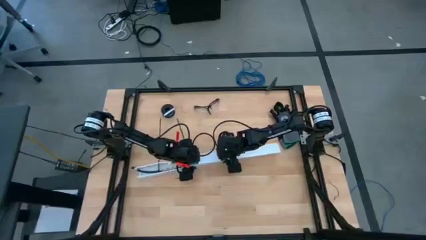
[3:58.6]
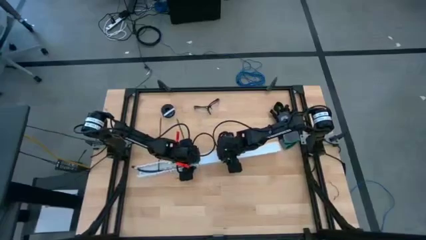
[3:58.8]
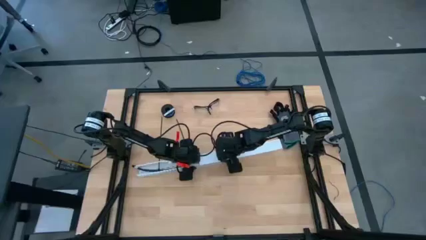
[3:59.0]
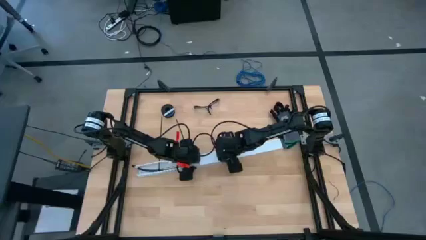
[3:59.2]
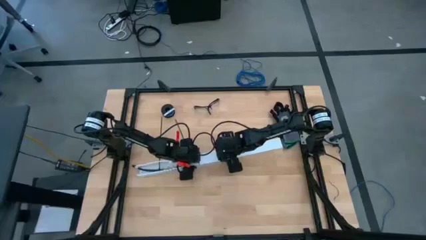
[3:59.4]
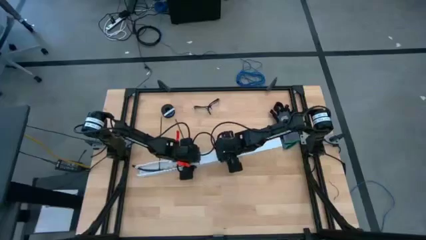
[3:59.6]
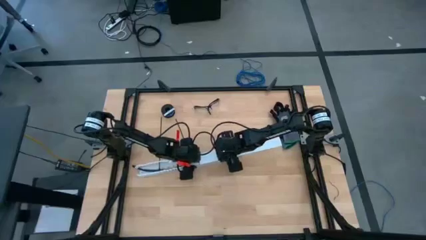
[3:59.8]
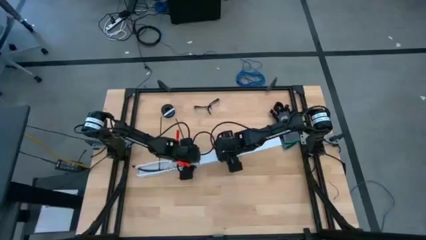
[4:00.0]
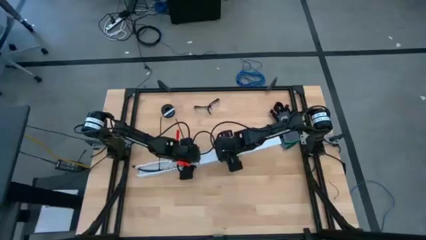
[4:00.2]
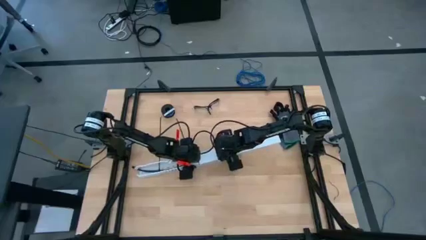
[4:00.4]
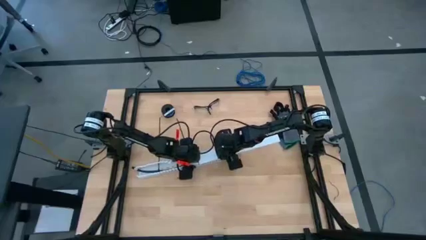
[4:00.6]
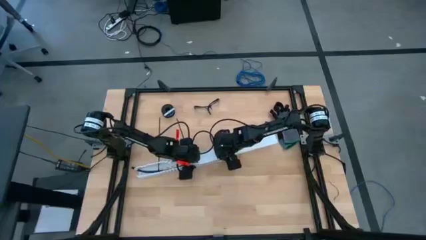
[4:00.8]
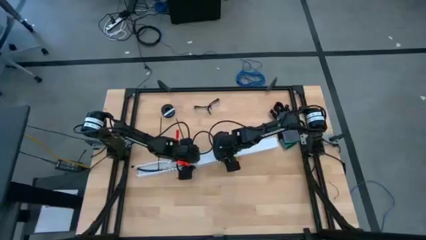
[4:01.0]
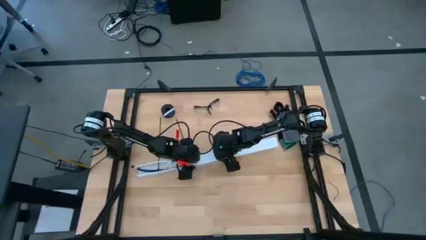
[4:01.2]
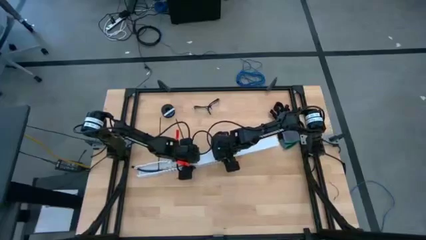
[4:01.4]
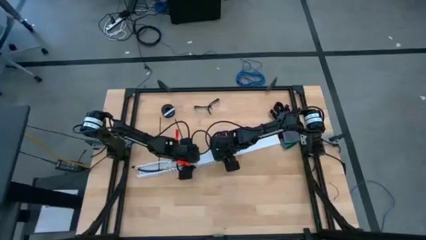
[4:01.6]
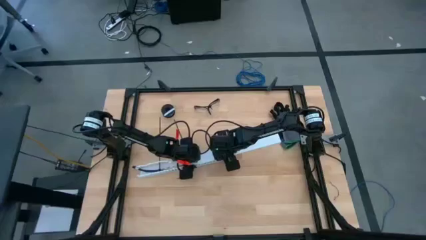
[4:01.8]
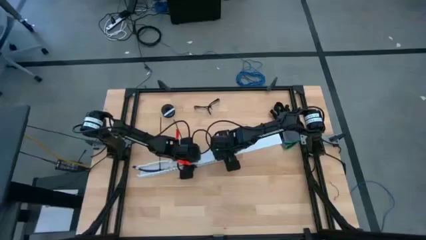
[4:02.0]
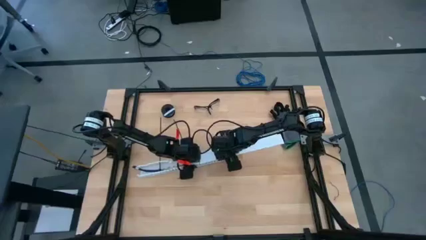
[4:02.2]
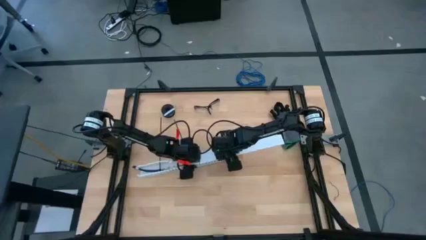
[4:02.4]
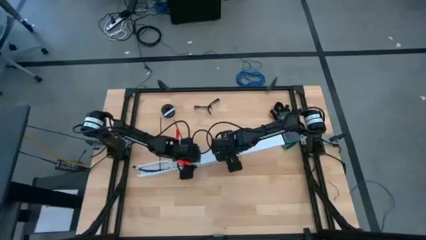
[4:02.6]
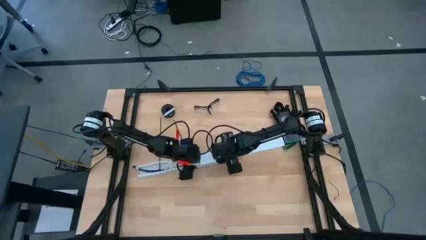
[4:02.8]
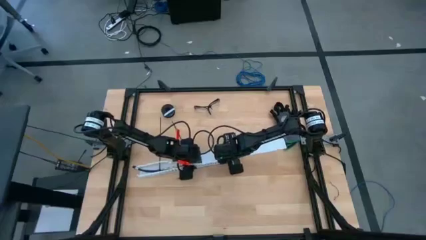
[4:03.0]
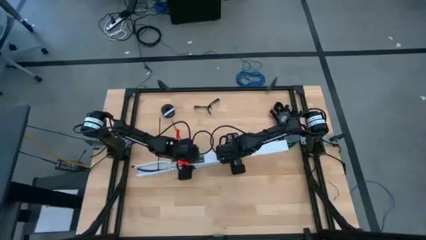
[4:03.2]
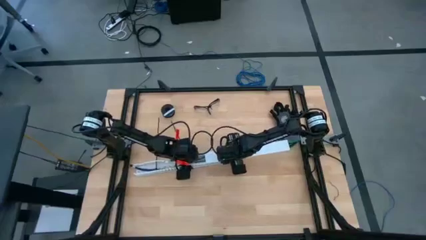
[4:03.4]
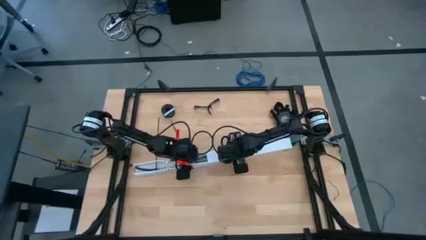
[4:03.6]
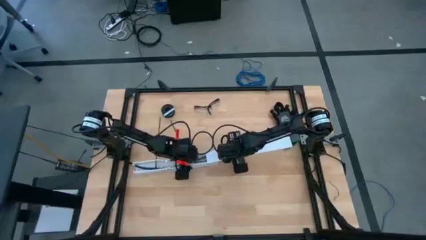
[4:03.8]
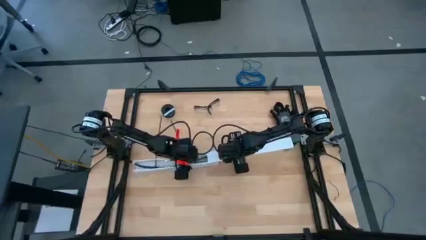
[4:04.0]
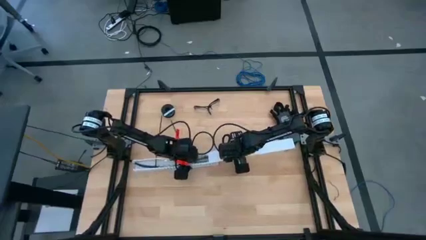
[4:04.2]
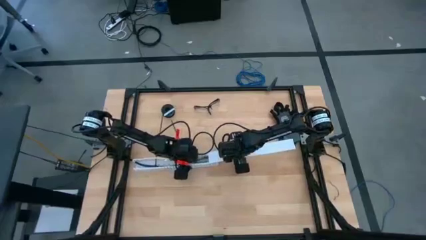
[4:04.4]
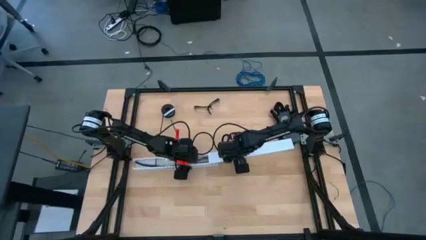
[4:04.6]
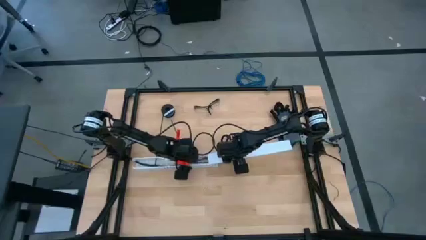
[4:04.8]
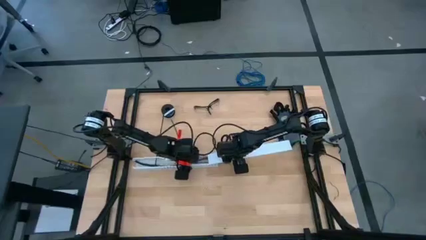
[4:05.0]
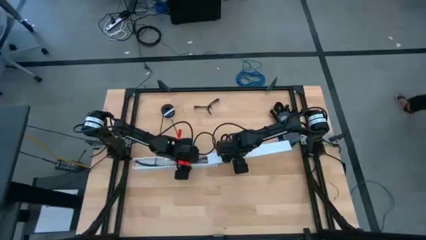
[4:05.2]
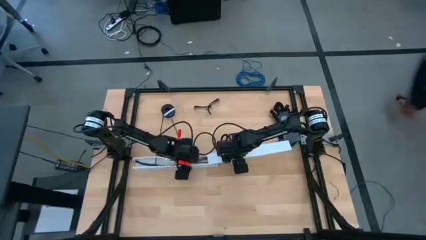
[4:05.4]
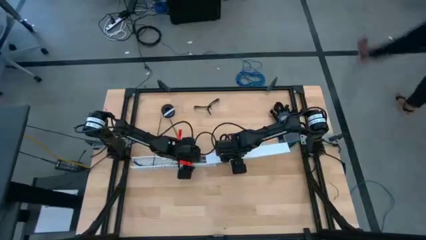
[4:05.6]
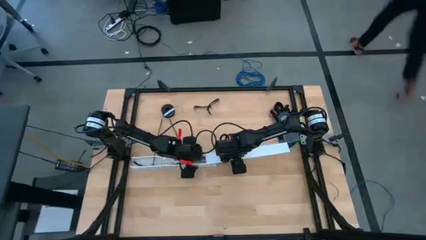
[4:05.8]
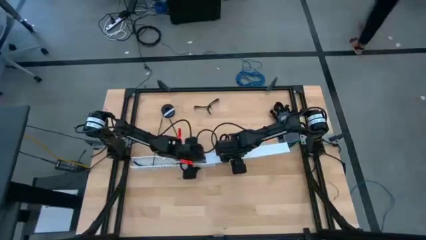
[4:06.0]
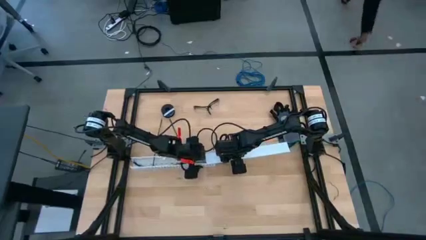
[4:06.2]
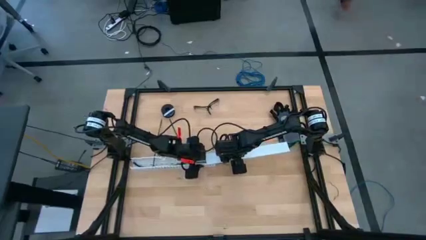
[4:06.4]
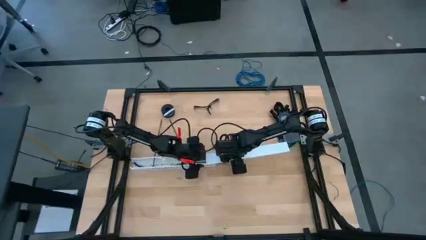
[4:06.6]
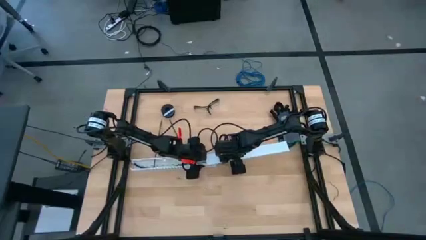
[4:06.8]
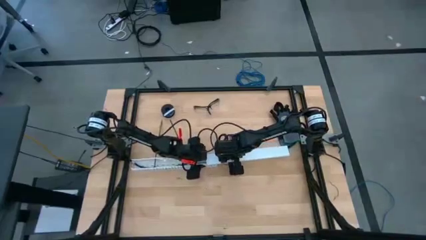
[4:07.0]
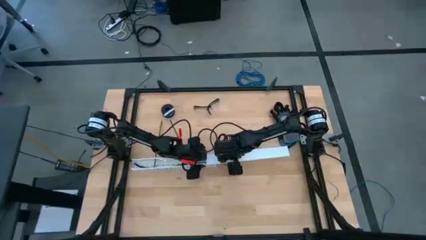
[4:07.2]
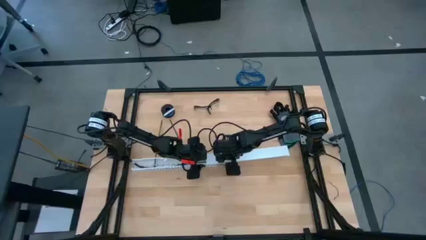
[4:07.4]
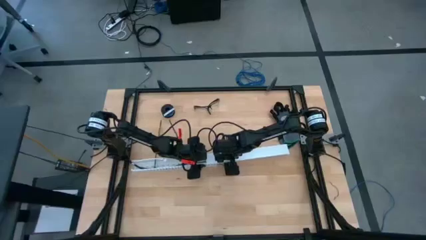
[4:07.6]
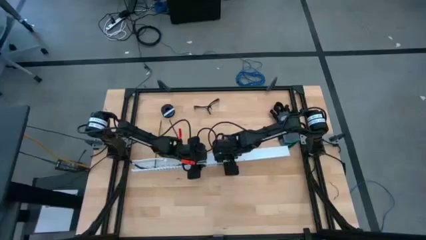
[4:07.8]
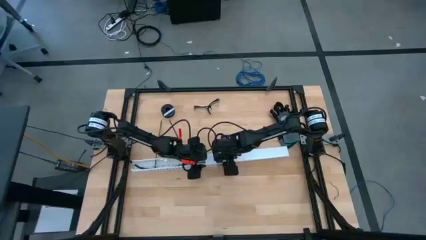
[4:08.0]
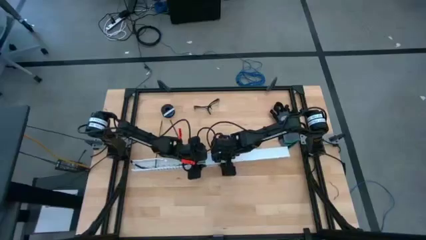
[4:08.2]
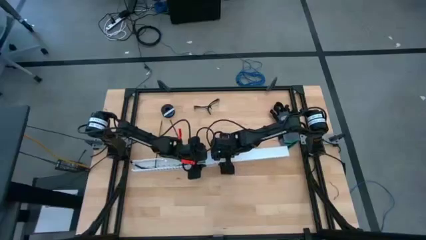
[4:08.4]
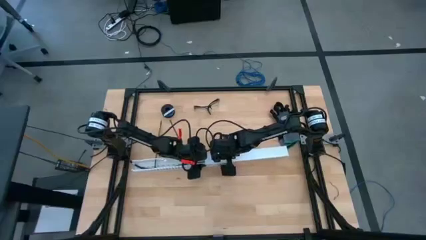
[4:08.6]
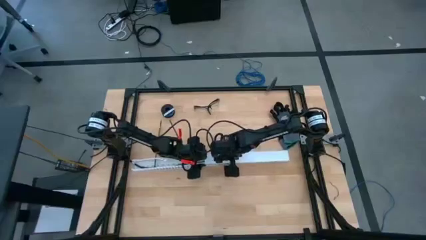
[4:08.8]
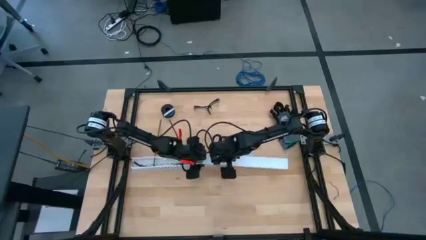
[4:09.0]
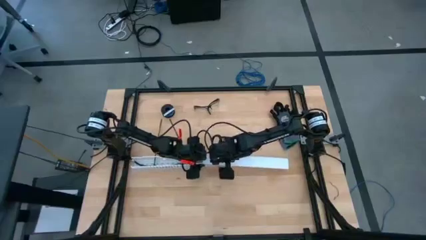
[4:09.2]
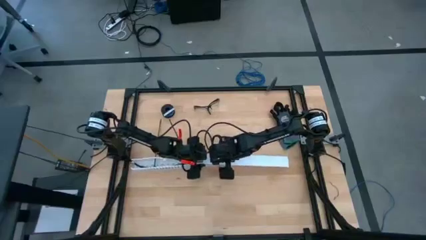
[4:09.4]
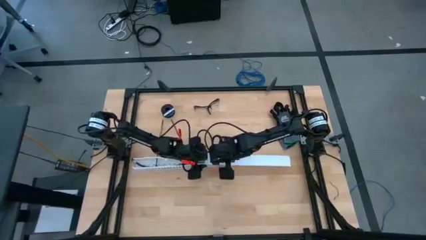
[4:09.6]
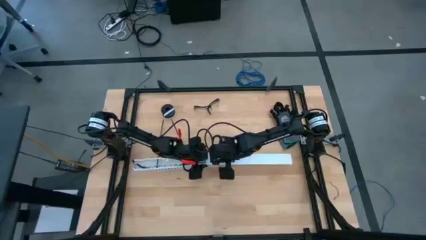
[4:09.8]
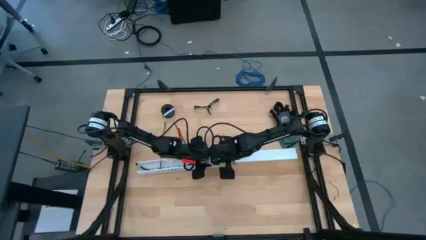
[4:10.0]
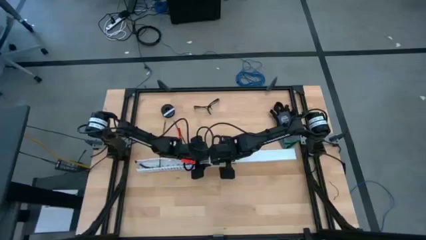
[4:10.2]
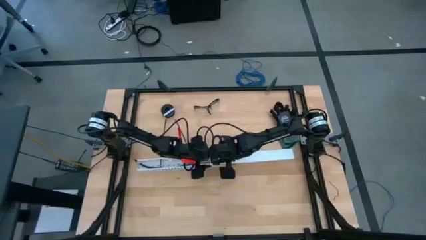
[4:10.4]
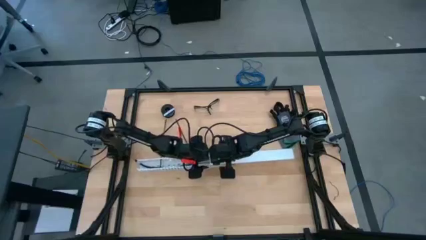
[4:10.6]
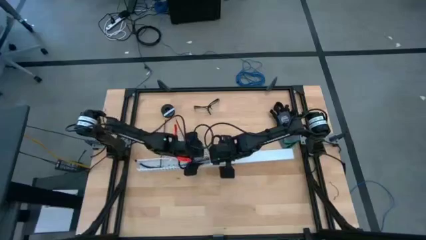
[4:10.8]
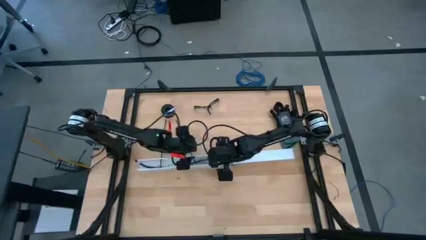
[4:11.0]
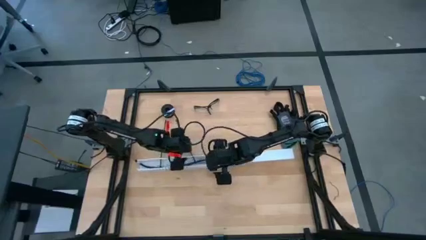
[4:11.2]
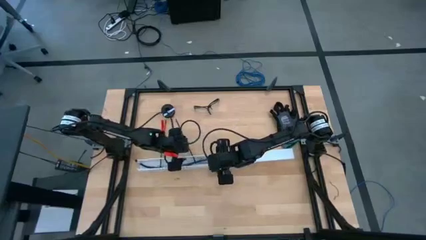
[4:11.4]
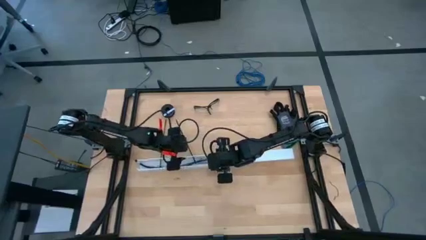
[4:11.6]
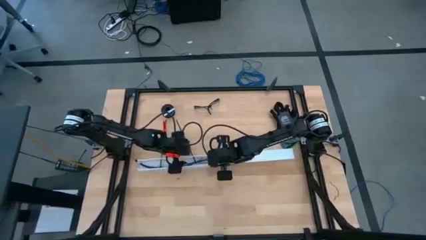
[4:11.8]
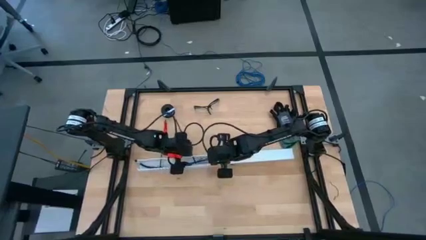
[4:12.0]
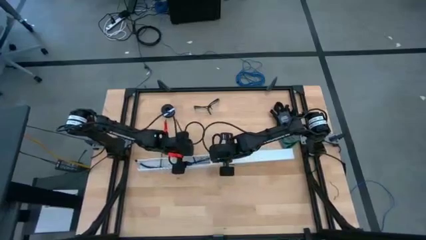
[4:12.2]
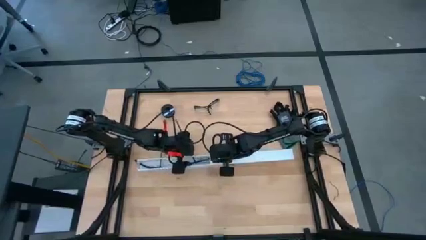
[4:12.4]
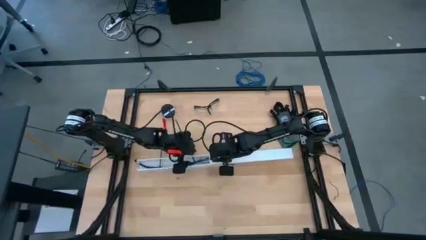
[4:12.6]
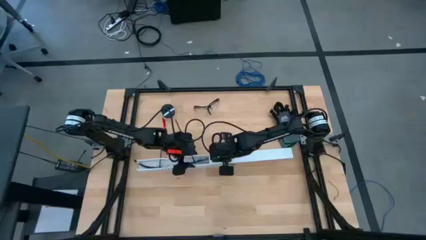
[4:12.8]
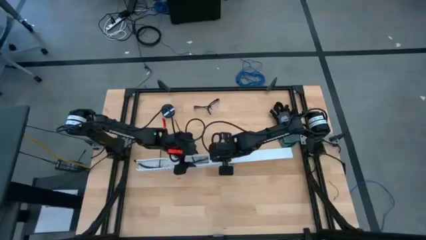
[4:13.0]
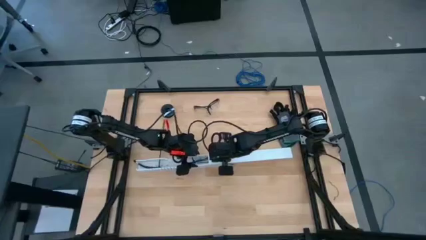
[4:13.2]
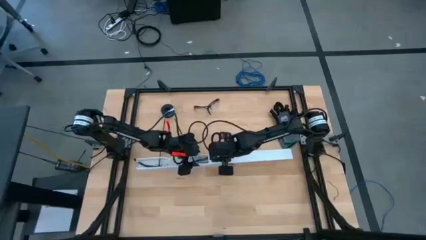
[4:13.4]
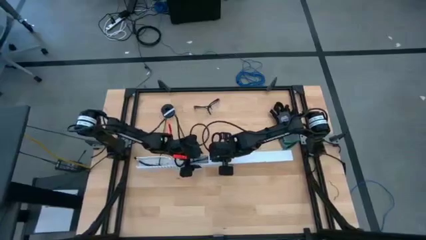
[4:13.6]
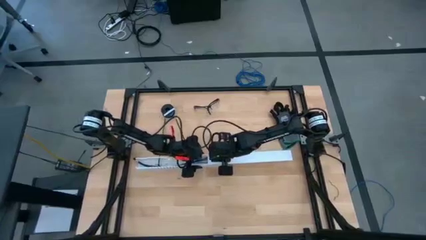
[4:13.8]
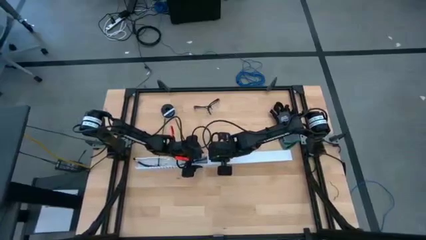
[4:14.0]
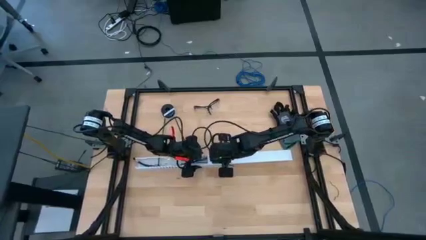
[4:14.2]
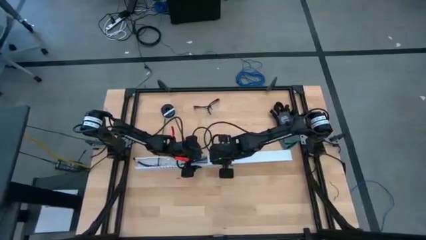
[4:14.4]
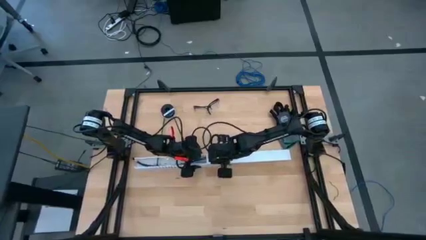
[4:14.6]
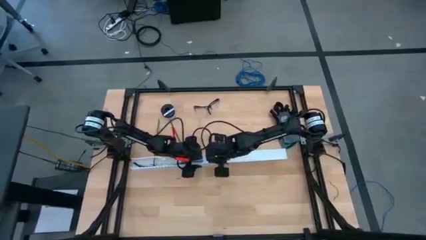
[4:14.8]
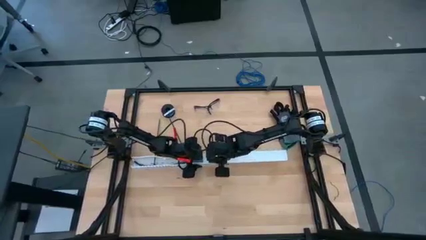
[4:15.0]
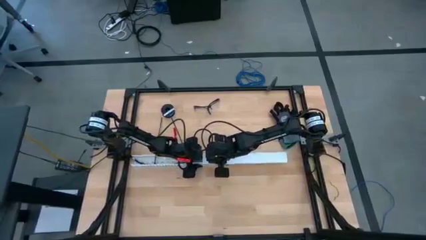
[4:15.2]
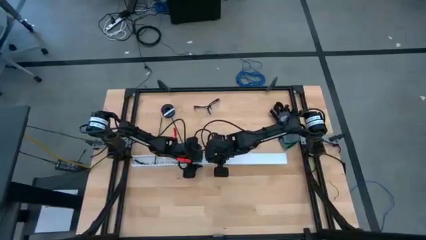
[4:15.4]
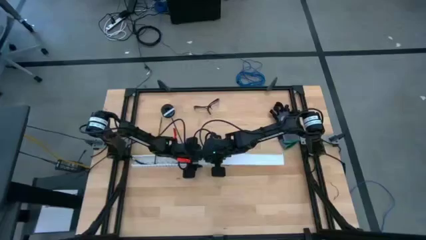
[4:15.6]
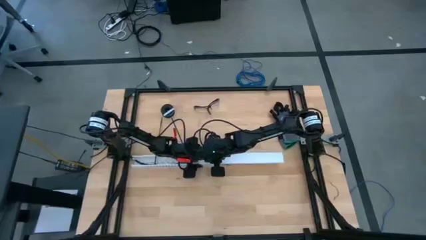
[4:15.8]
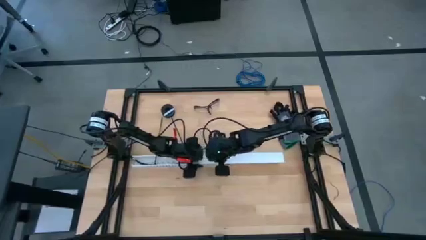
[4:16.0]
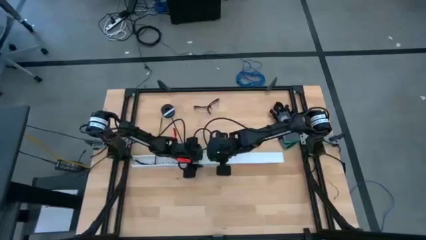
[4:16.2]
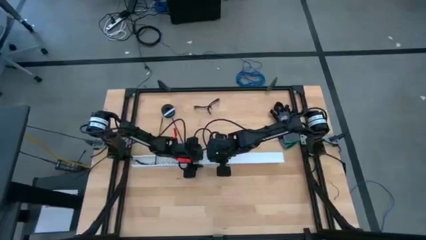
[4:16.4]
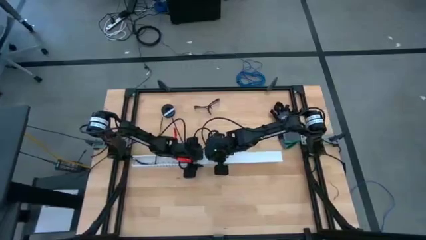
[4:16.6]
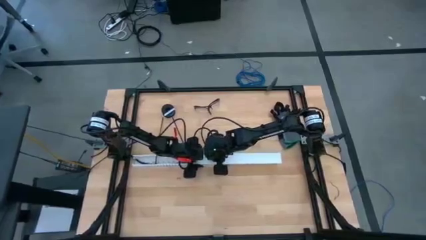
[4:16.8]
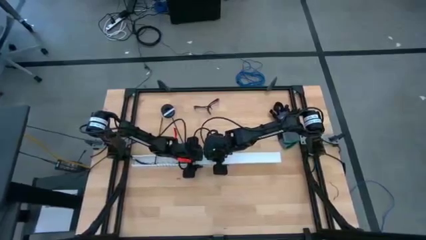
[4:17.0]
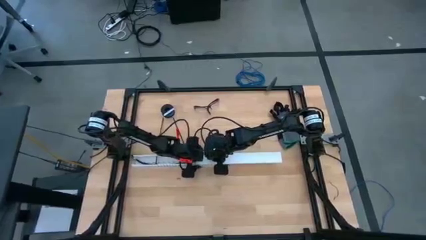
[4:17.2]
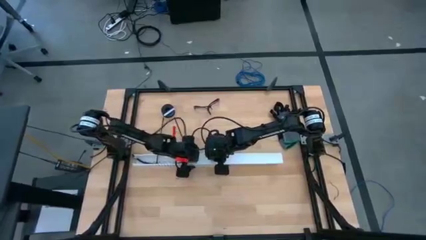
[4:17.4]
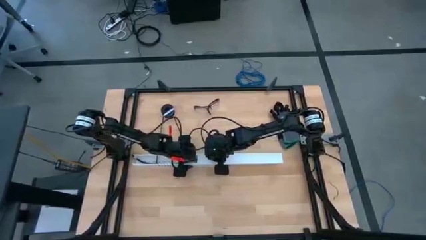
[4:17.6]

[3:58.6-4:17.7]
Task: Ziptie cables
Close the white cable duct
